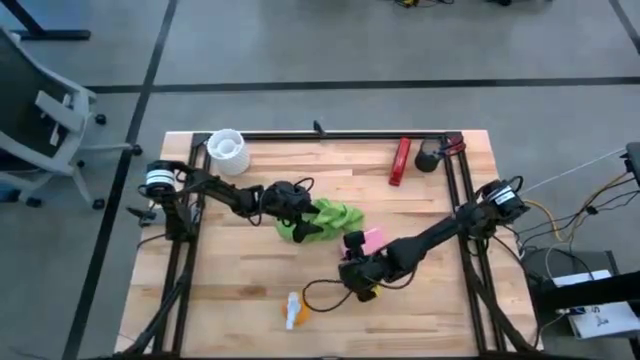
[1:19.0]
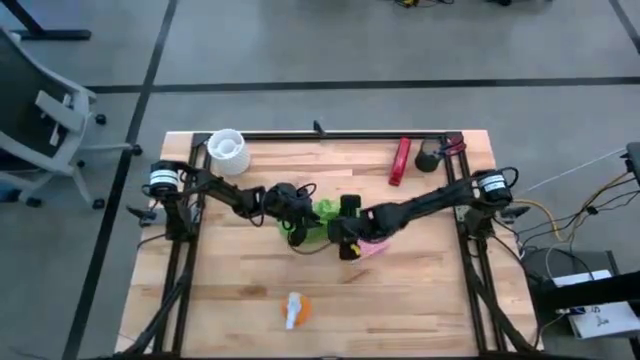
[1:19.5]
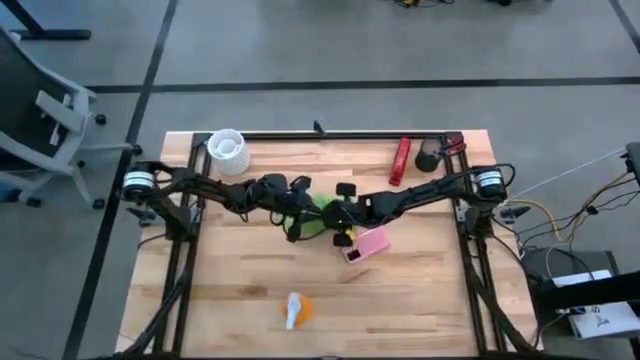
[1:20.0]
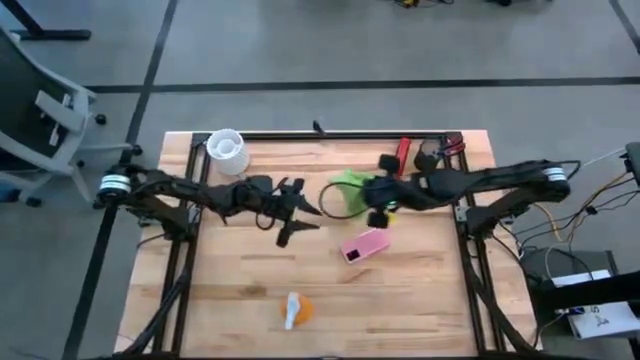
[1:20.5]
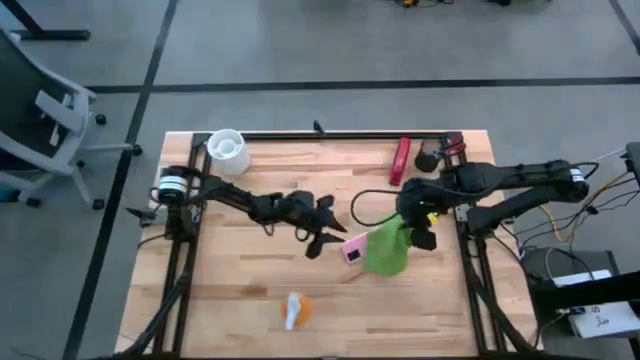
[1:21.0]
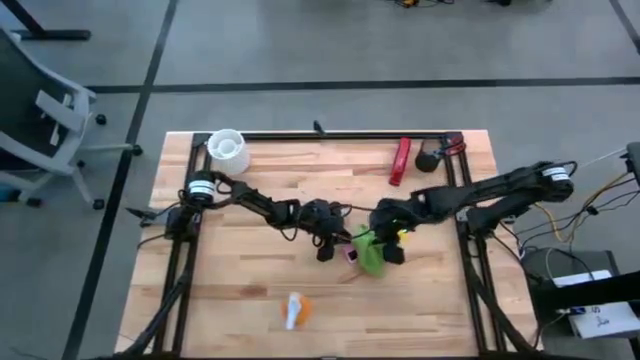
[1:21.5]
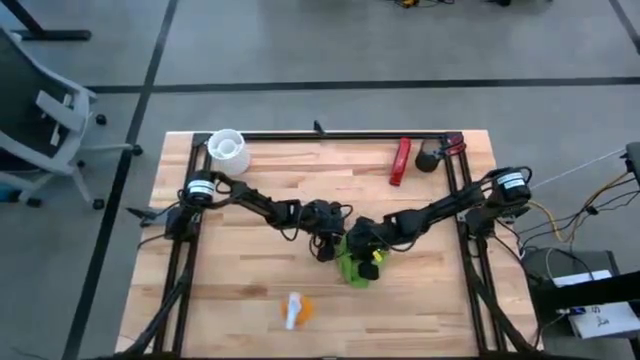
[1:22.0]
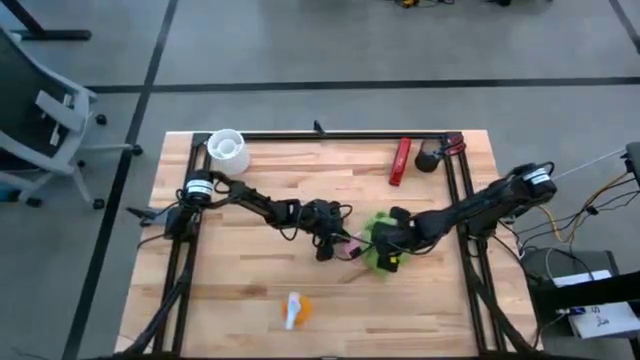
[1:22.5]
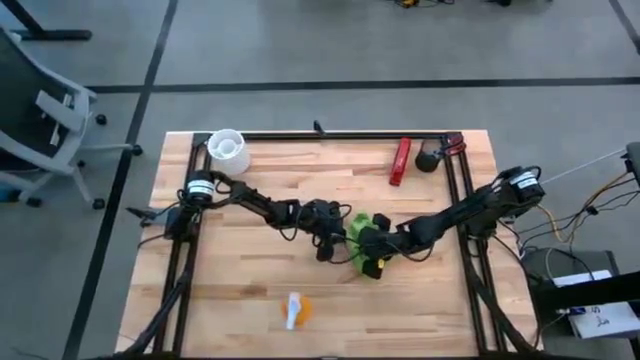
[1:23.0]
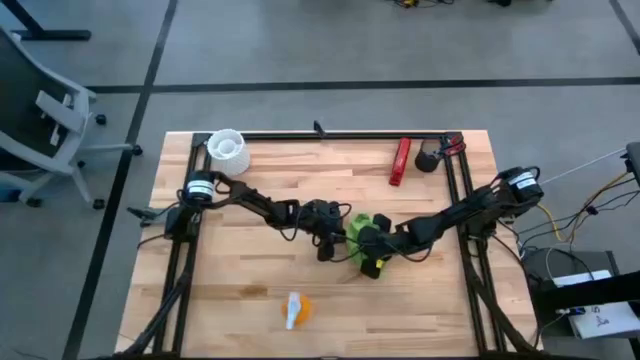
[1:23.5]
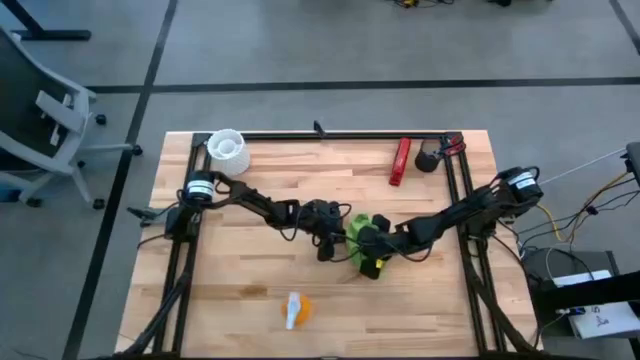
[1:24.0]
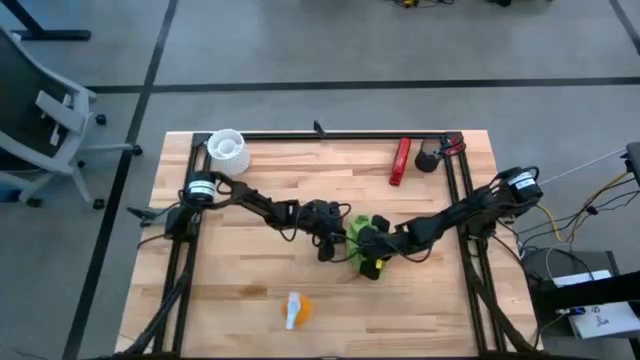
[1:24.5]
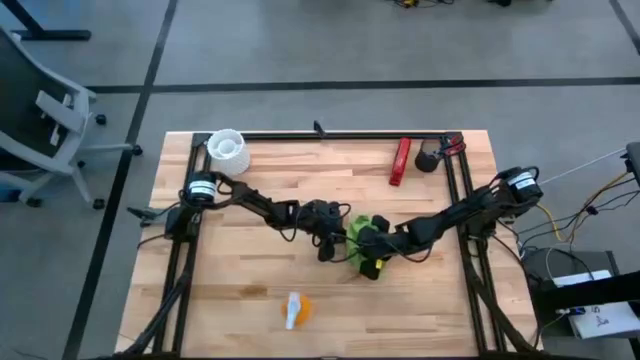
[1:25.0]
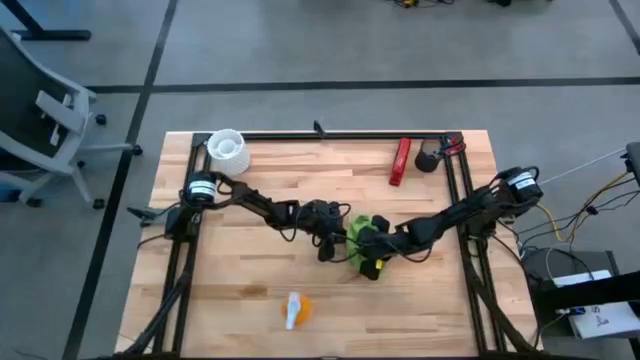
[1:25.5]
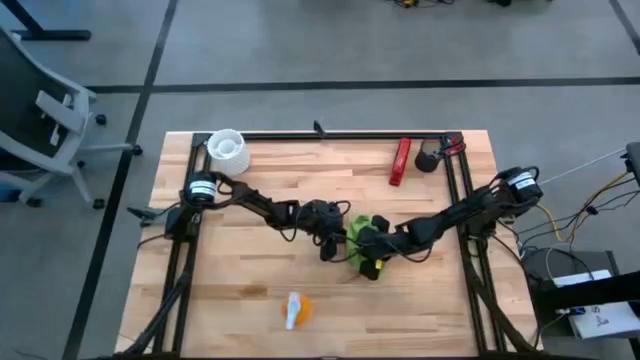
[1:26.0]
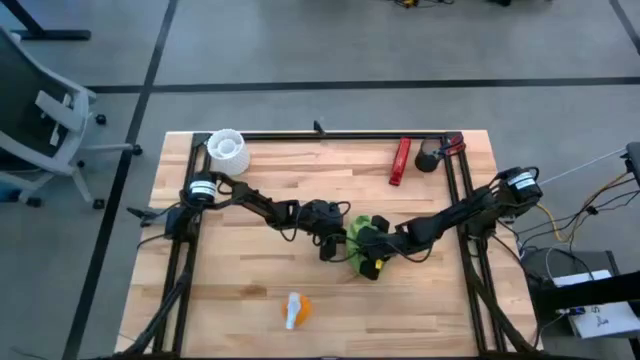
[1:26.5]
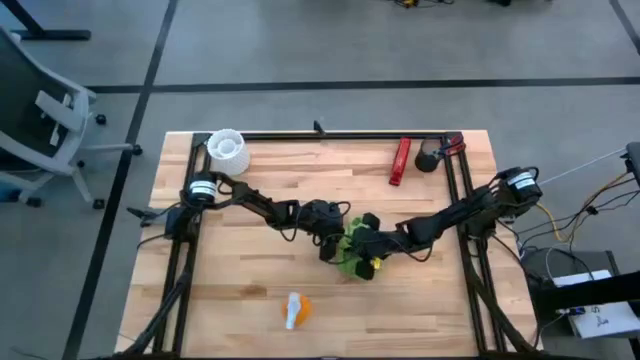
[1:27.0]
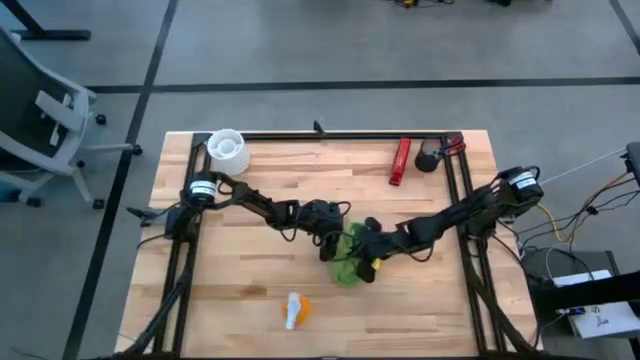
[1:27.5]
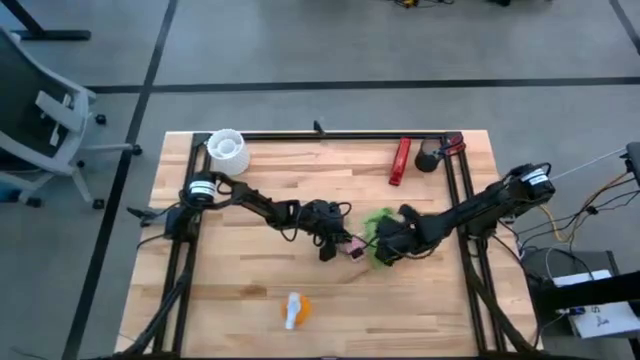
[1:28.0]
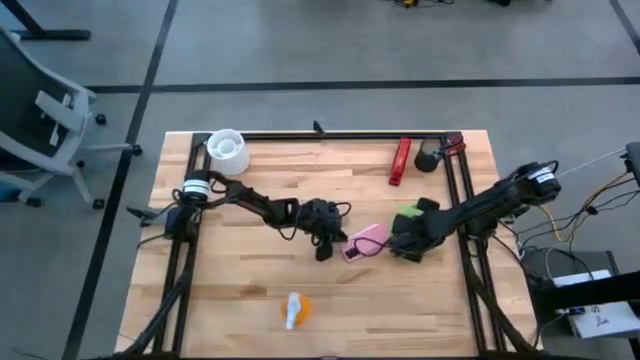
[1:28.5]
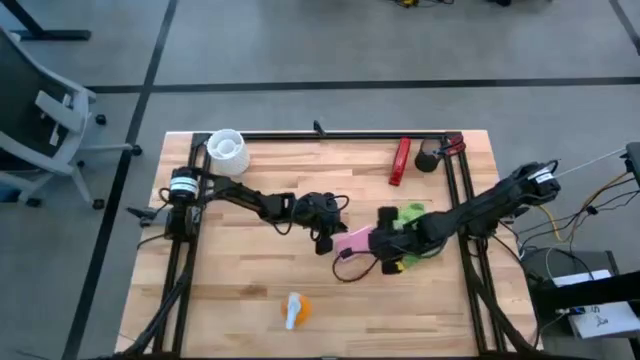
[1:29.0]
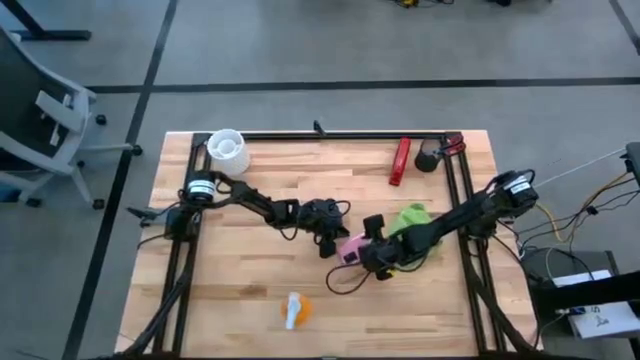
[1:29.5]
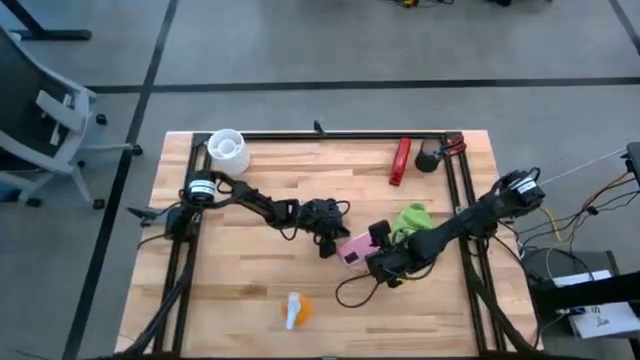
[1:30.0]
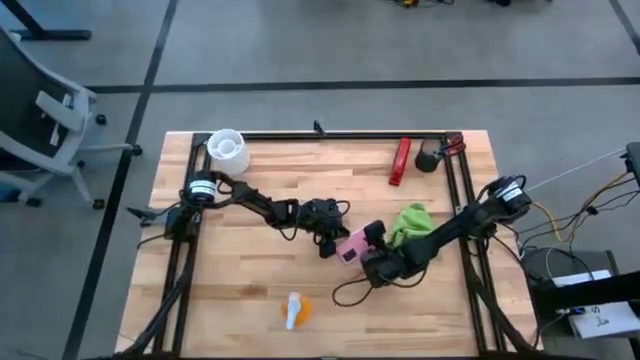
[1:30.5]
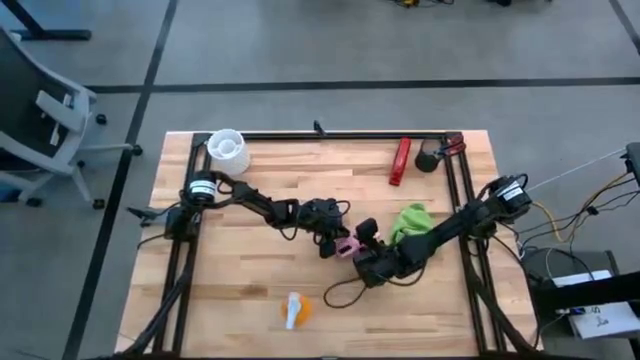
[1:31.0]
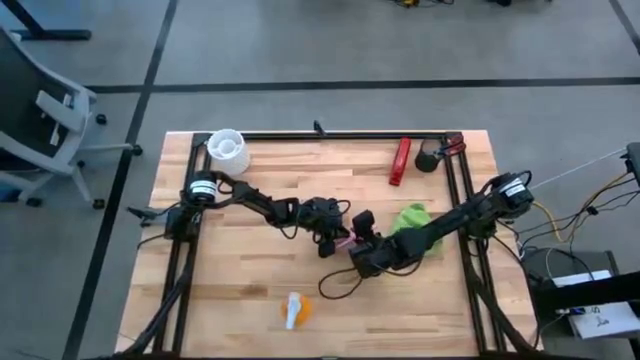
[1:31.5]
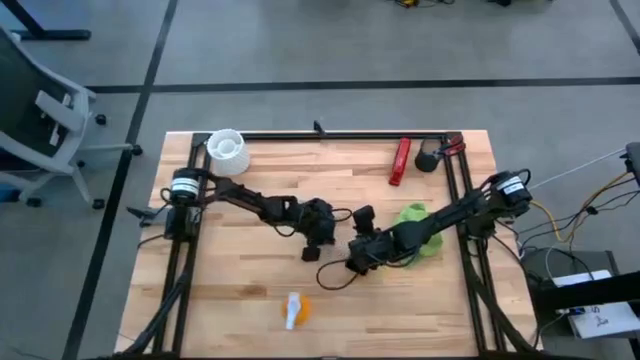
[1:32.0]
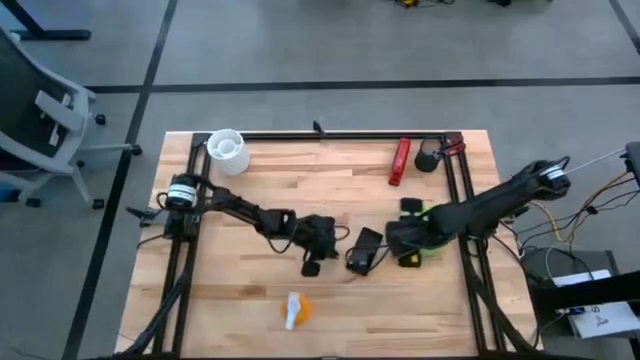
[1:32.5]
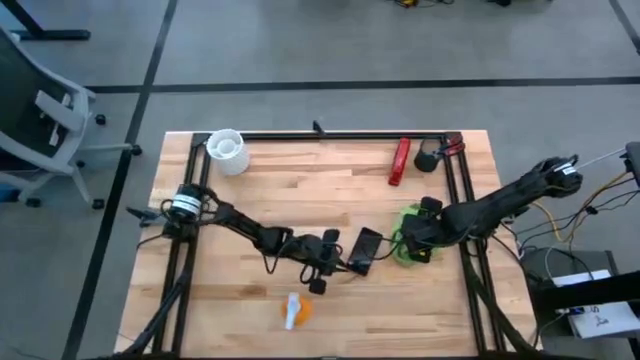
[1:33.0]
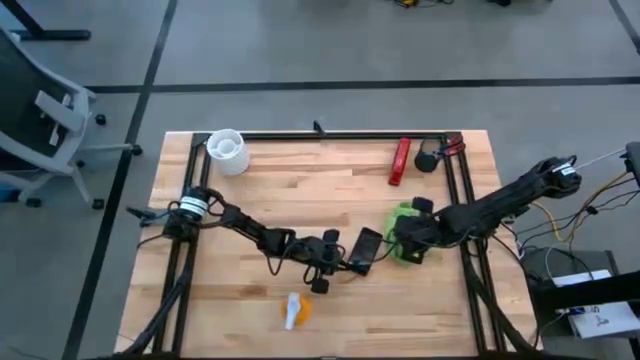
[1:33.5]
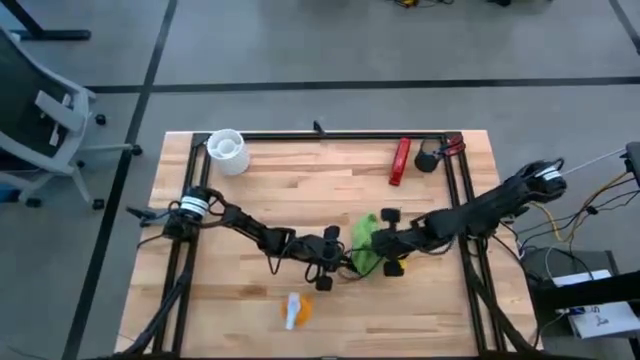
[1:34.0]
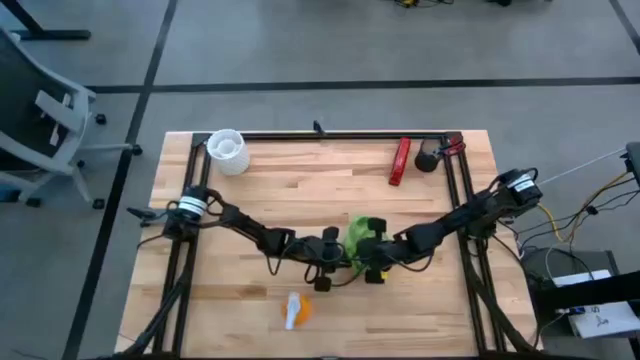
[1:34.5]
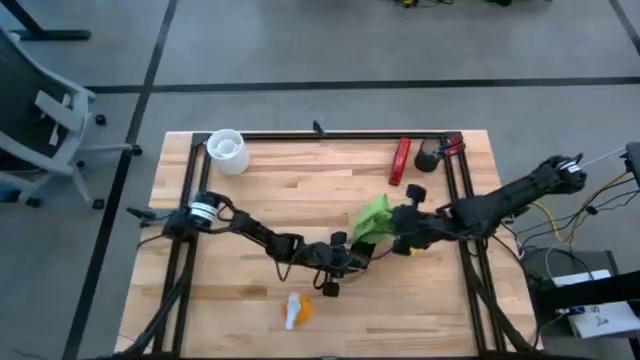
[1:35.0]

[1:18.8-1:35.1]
Task: Apply microfiber cloth
Wipe the back and front of the cellphone using the microfiber cloth

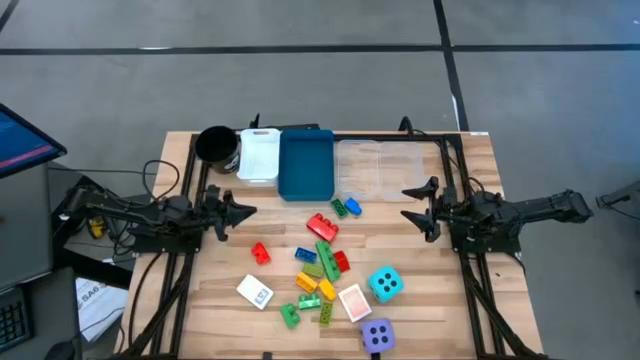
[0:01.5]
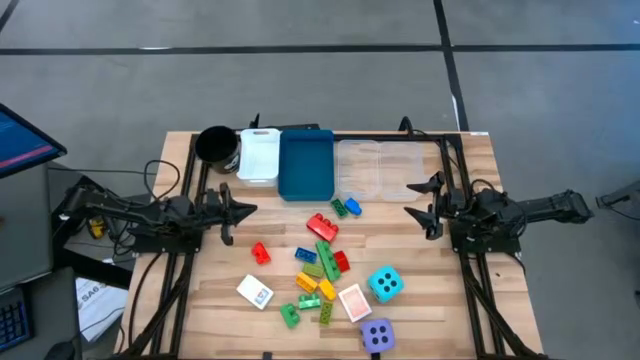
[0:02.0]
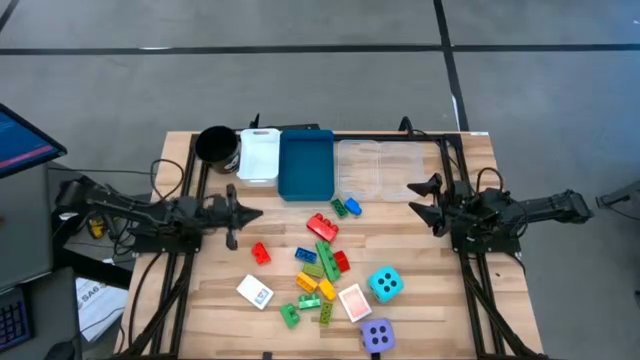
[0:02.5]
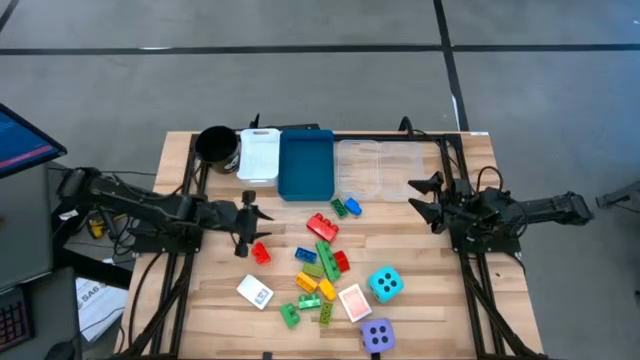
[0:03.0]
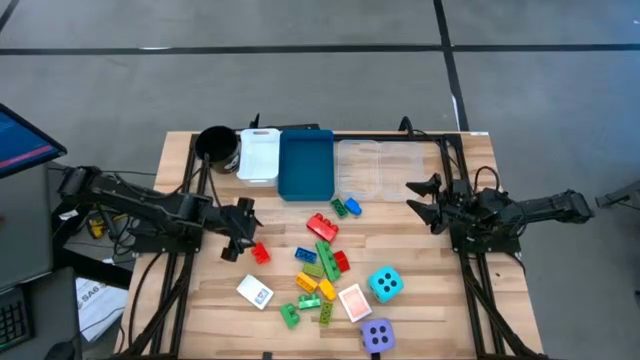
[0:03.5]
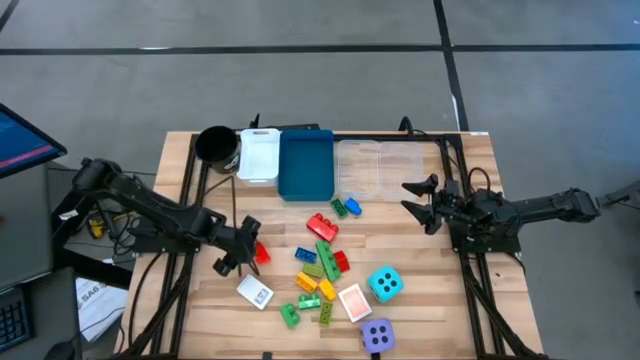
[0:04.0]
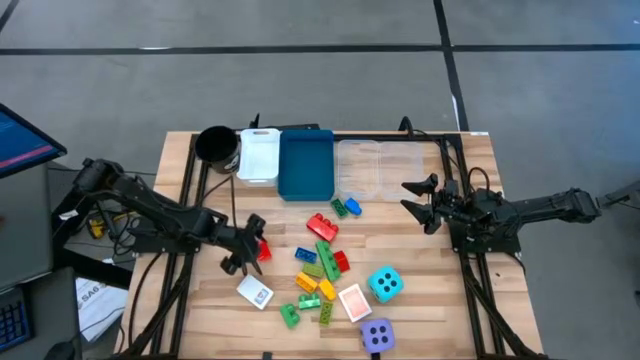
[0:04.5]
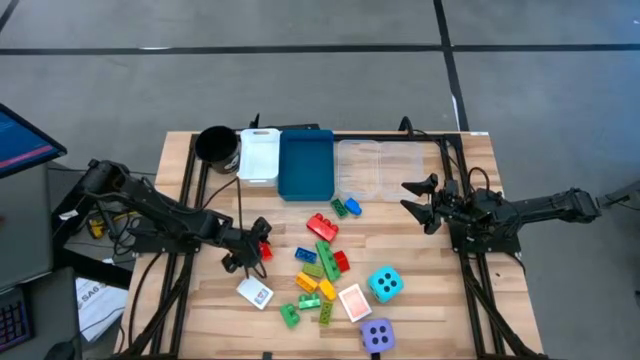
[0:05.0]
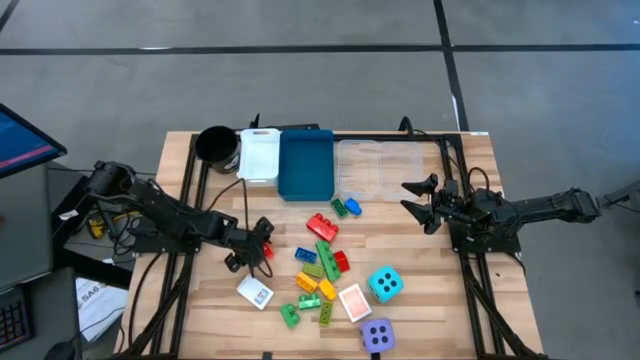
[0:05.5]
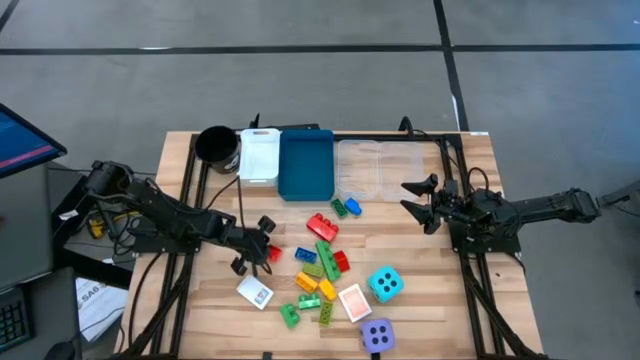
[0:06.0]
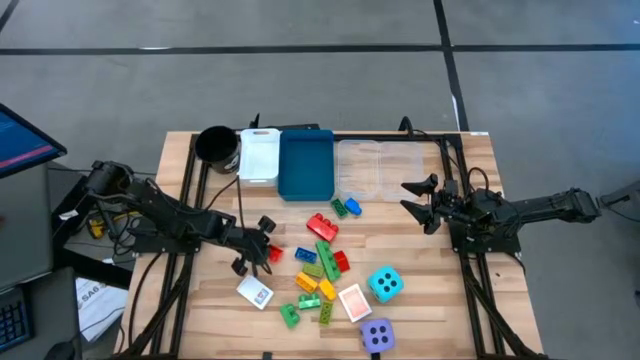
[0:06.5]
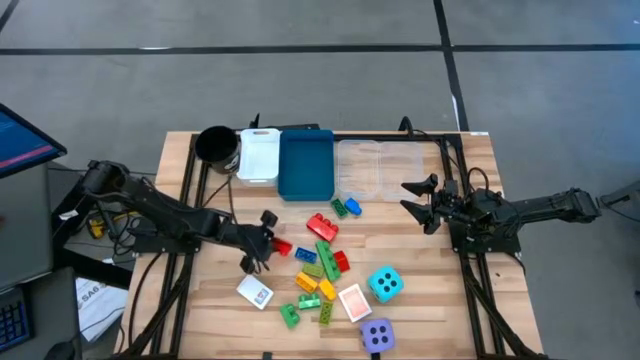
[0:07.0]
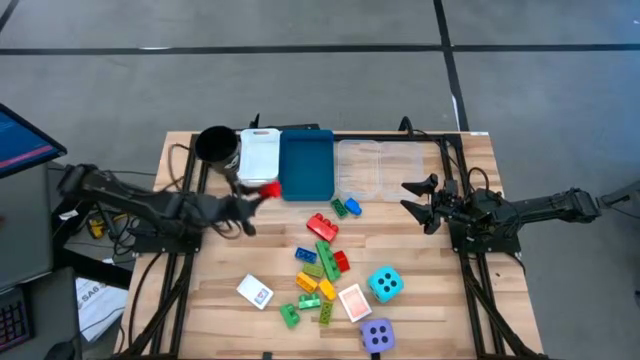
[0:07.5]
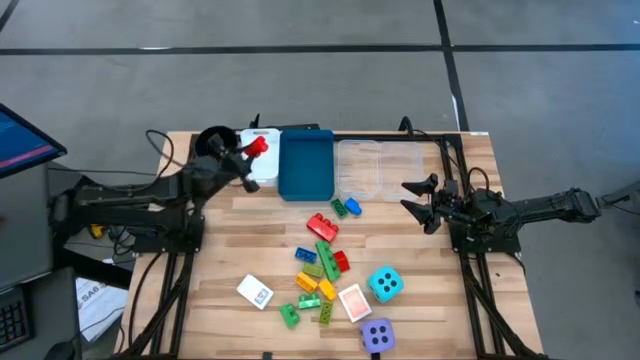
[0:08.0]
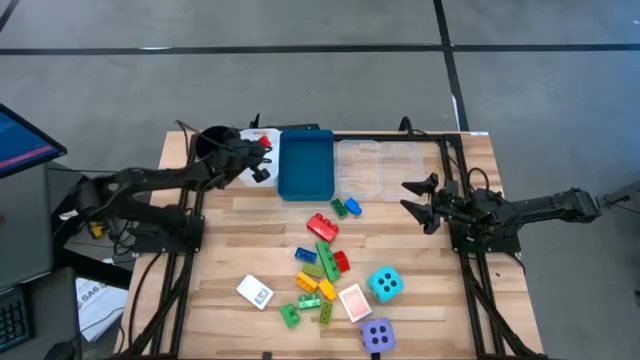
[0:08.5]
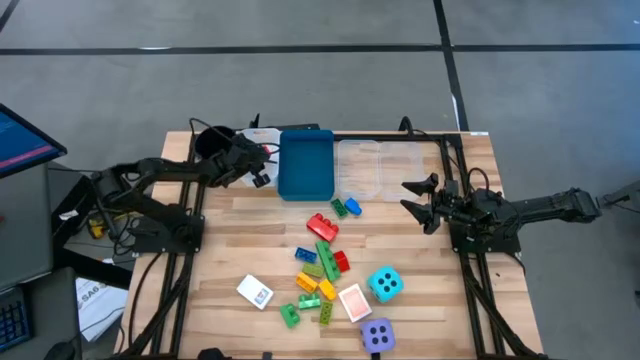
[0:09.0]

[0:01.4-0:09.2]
Task: Pick & Place Toys
Put the small red game piece into the white bin
